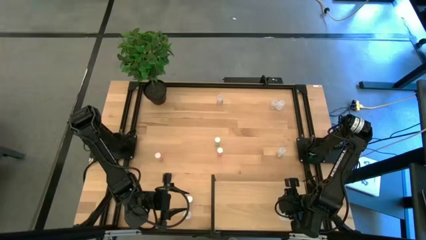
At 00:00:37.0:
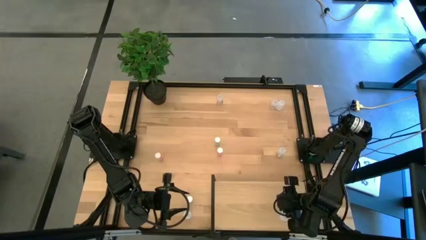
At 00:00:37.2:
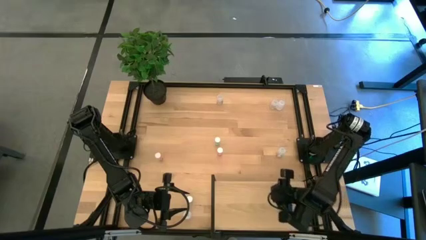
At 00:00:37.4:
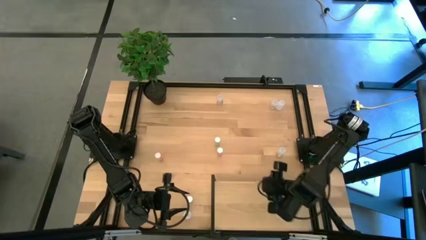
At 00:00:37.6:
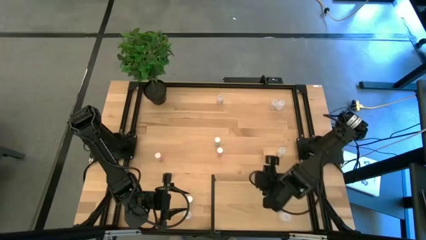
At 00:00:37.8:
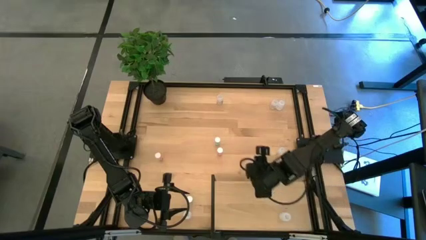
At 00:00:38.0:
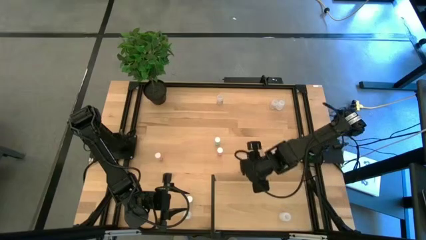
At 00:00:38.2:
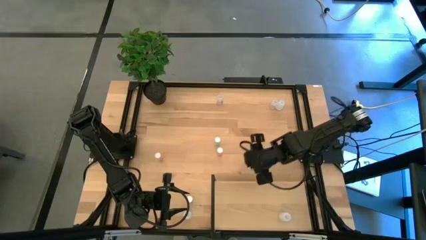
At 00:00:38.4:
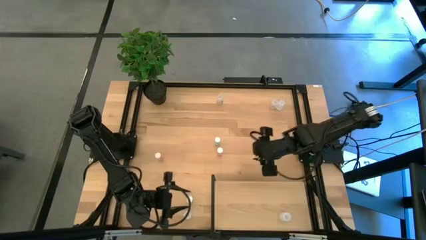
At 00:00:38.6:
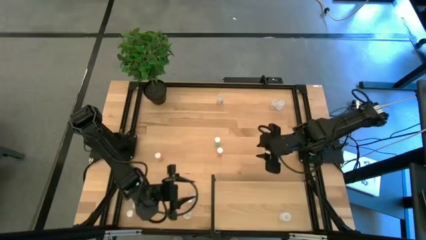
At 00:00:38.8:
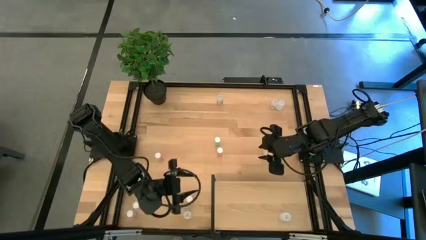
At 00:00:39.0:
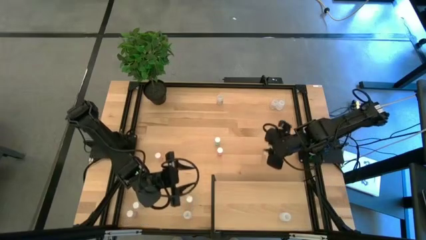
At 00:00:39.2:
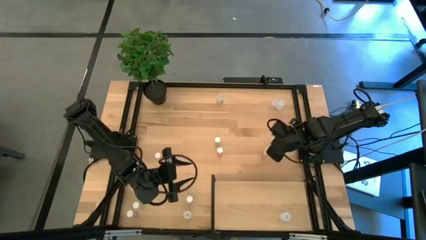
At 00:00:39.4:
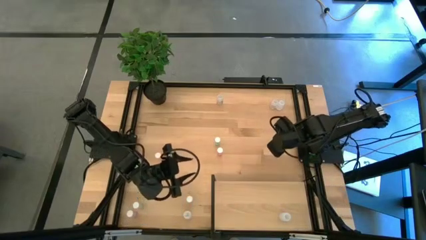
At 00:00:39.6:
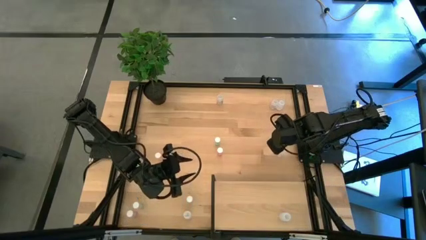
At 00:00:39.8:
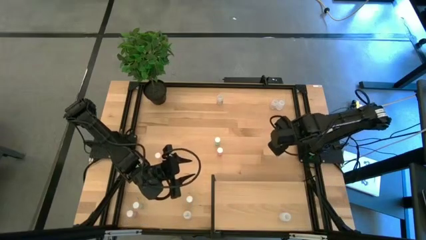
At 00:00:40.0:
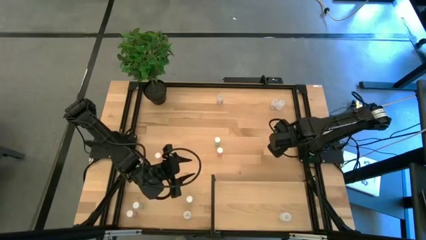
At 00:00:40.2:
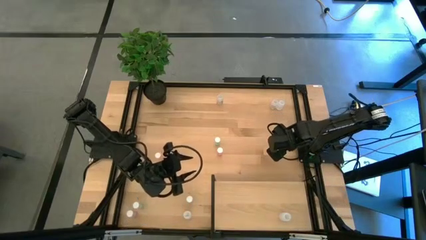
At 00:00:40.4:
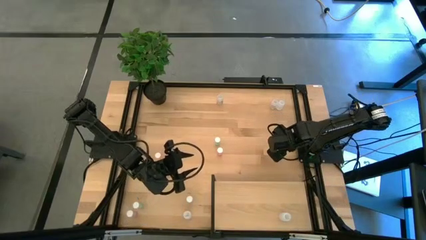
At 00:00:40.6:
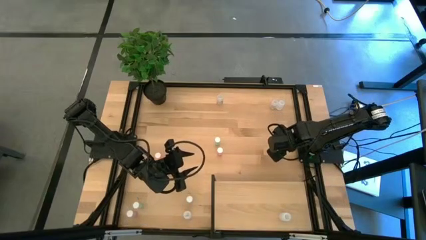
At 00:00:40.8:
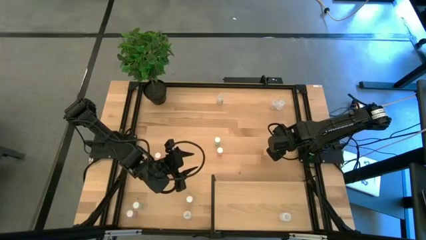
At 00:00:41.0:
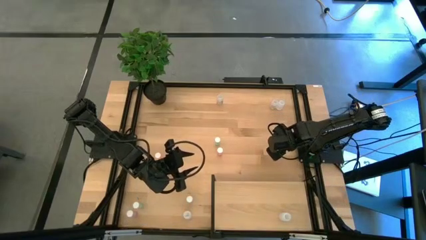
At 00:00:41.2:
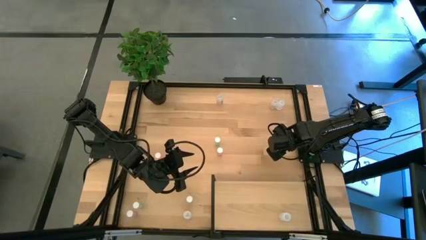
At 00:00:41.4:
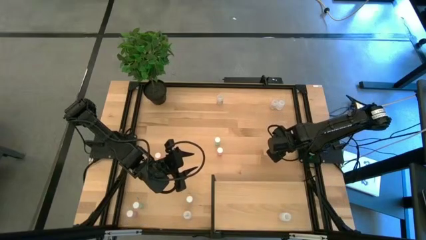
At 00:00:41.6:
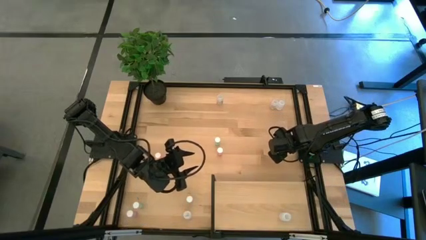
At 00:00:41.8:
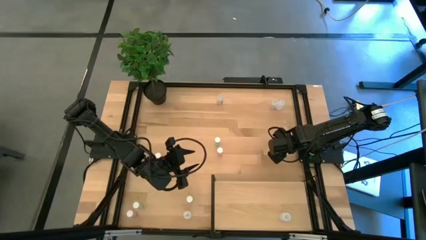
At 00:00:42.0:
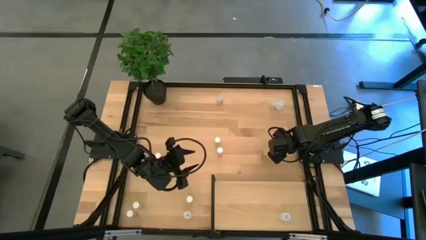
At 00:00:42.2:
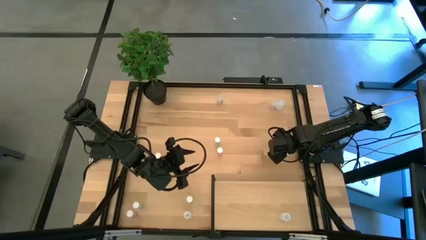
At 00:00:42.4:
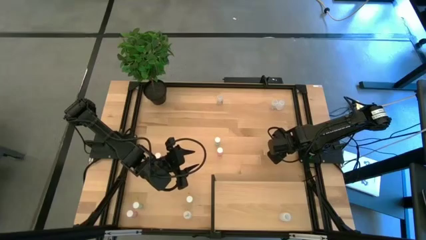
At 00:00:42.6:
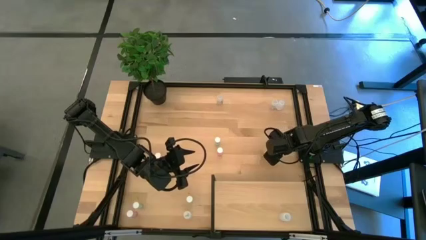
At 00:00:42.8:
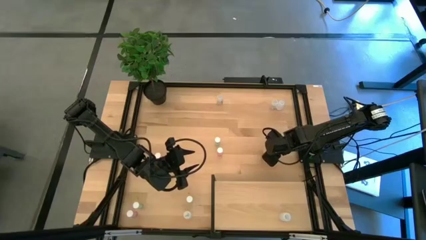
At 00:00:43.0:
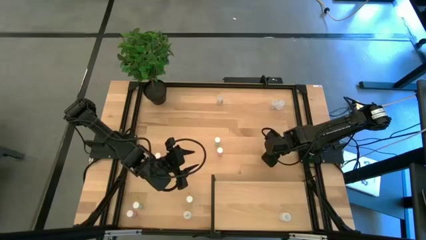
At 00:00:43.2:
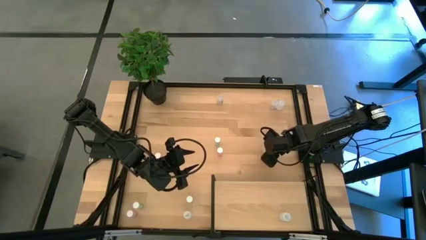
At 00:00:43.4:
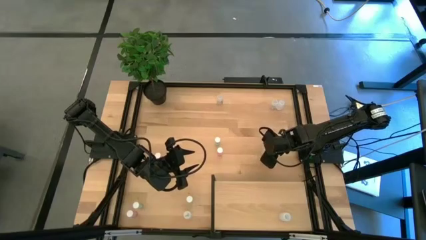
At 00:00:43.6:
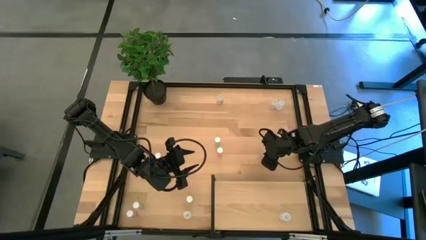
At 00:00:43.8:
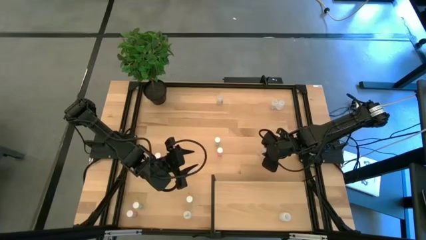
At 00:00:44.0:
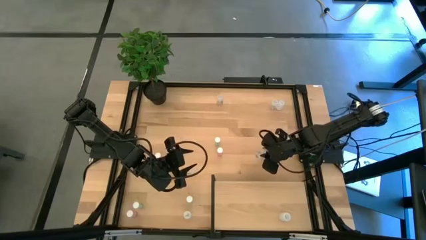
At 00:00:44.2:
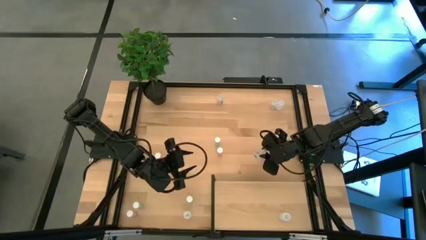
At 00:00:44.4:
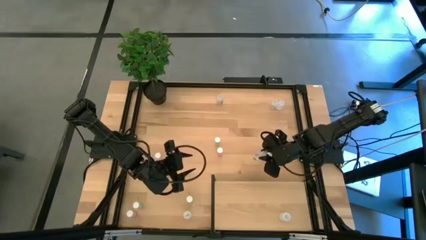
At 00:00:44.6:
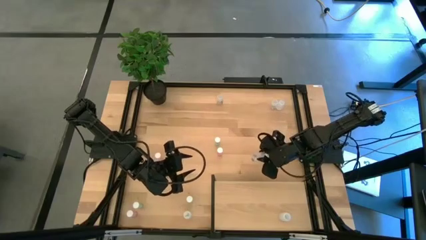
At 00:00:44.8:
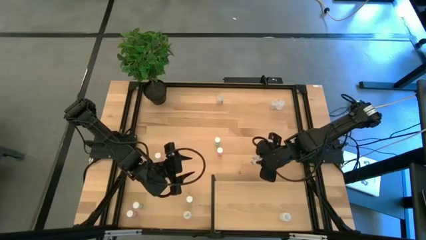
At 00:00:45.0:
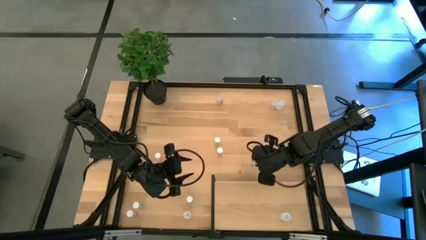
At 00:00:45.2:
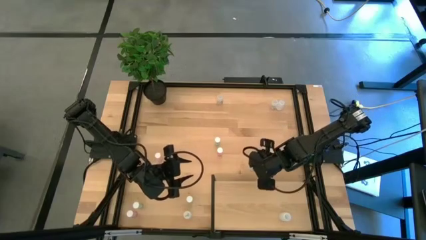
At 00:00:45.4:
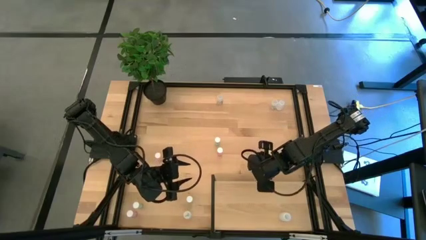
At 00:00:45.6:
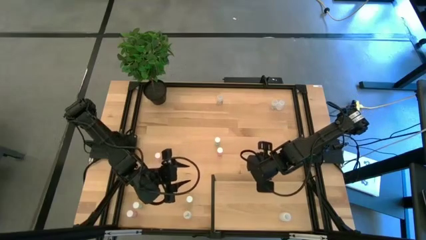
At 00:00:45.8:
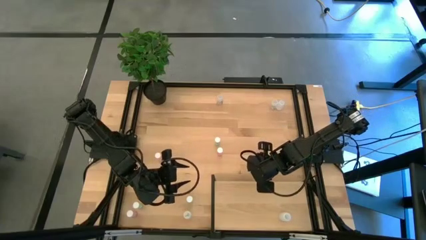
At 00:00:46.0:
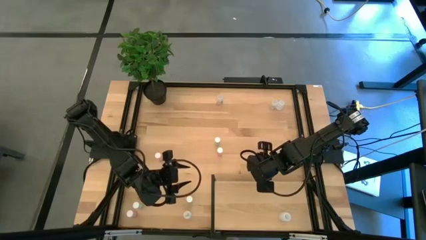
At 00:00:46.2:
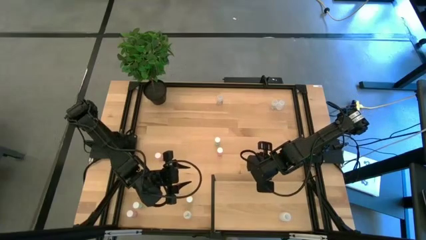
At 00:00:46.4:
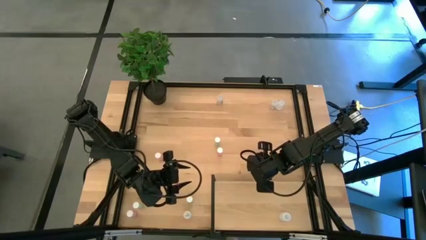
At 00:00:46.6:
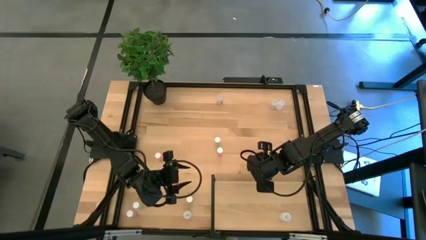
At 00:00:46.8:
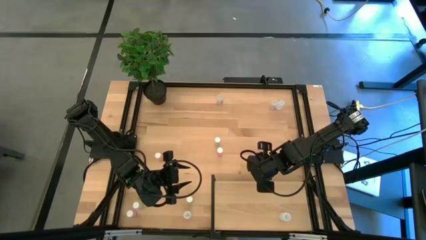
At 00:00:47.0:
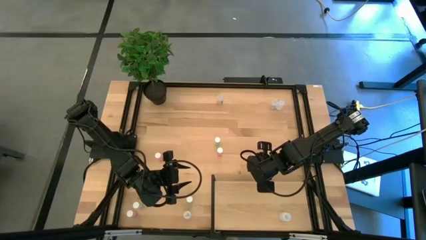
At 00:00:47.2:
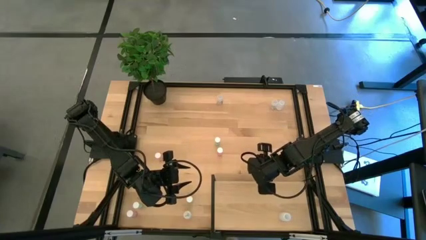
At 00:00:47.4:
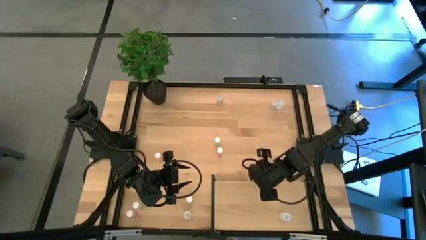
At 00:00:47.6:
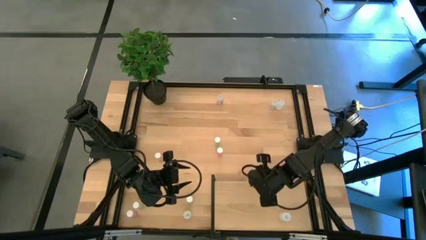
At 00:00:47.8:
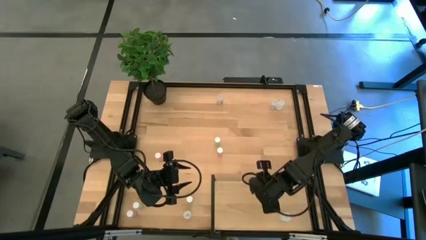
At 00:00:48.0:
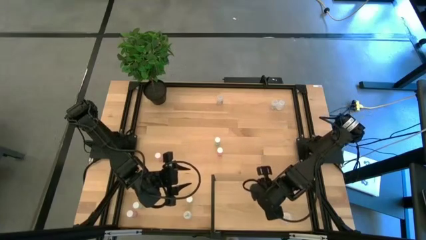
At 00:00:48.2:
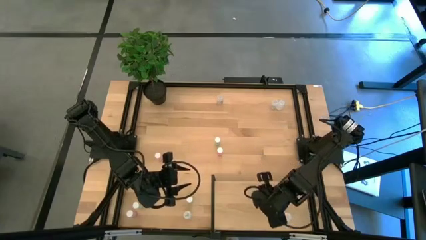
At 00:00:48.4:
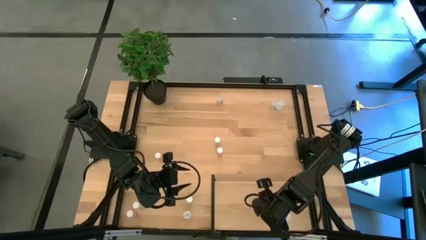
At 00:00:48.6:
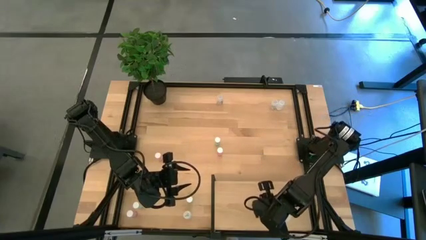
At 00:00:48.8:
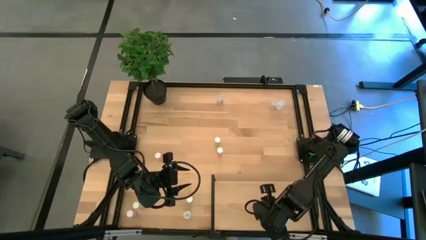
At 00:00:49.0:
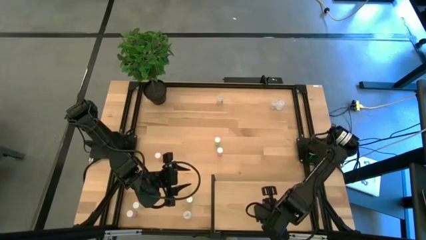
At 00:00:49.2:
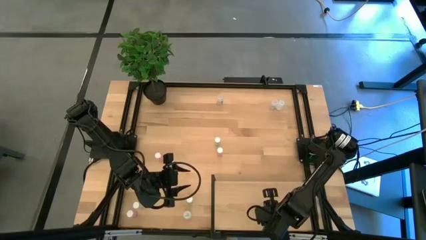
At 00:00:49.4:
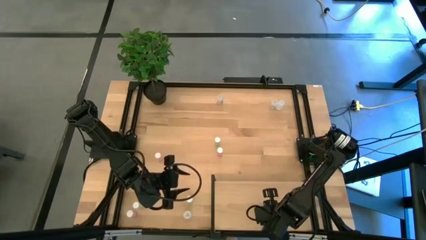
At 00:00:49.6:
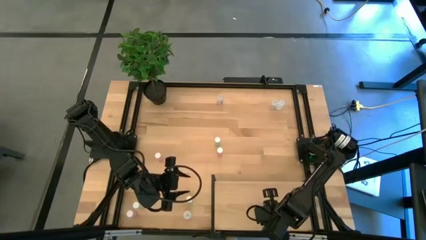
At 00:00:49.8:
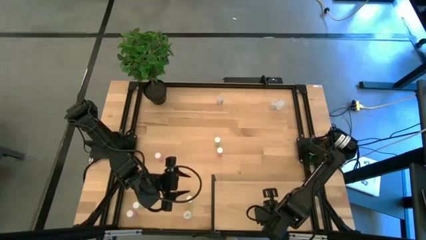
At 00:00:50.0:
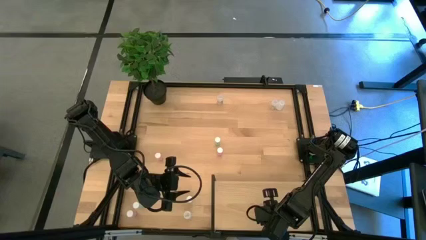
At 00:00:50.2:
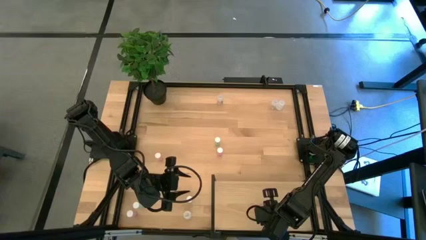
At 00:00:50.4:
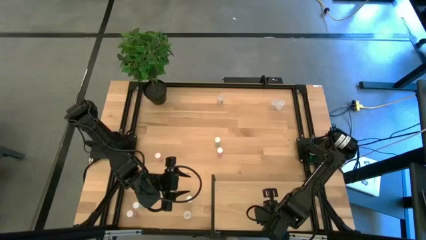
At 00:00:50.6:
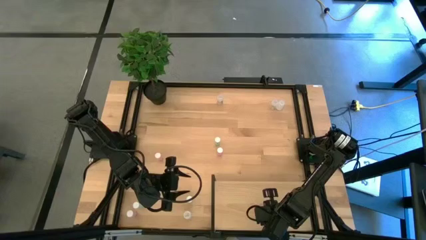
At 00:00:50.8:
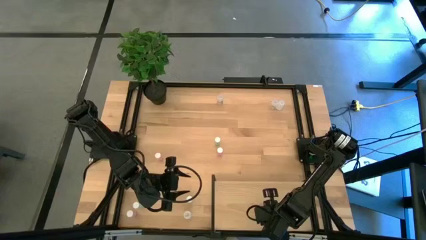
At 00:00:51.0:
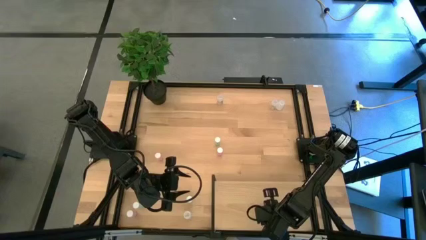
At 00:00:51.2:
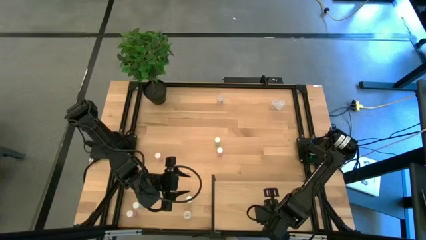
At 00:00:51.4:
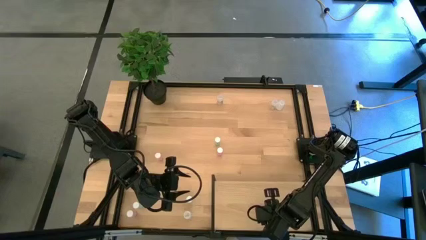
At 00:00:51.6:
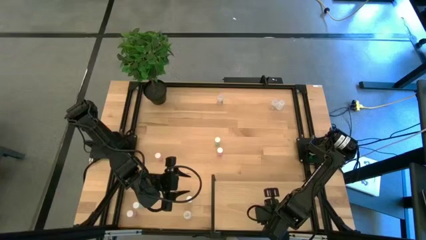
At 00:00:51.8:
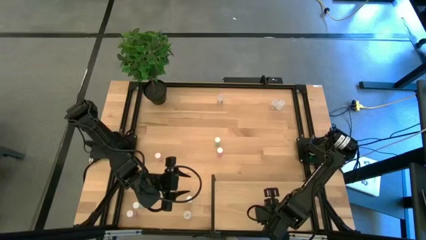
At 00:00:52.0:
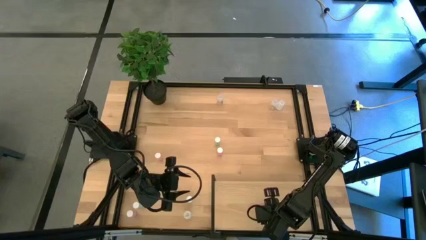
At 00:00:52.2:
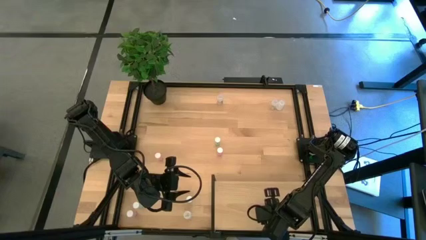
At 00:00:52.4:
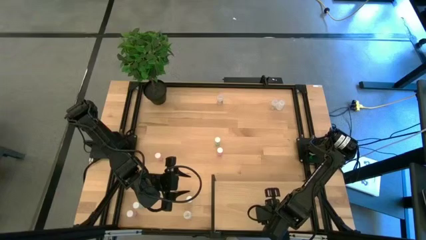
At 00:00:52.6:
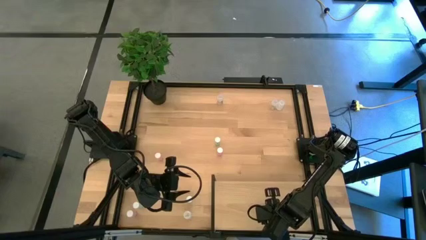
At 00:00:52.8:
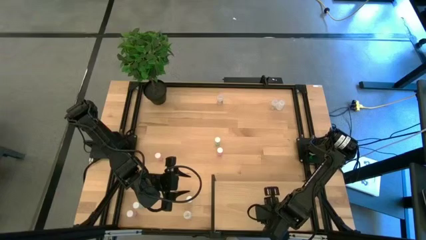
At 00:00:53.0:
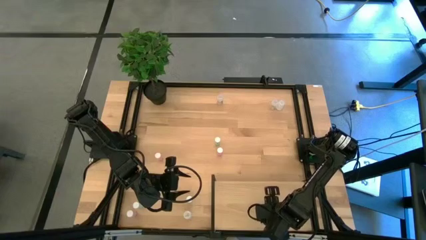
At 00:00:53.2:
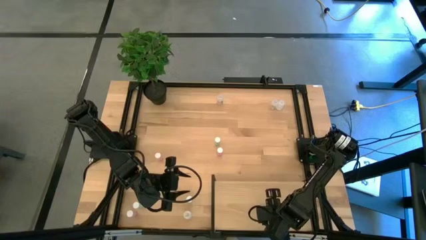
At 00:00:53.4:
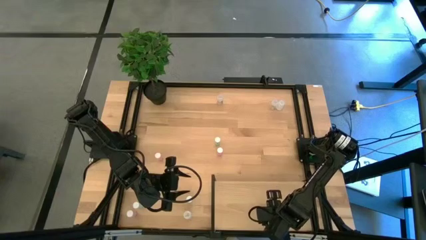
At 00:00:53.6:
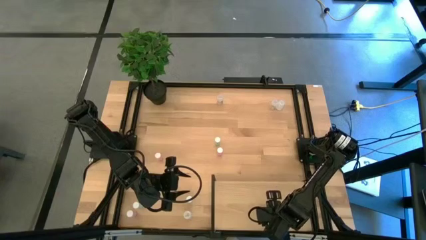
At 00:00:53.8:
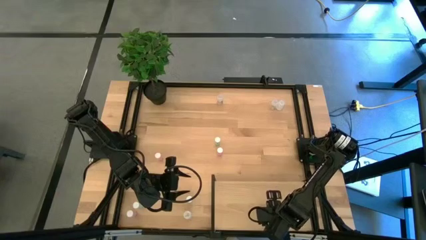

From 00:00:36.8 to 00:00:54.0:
Task: Pick and place medicine bottles onto shelf by color
Put the bottom transparent pill bottle on the shelf
